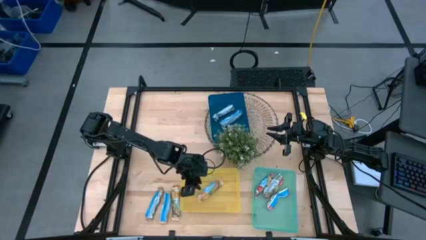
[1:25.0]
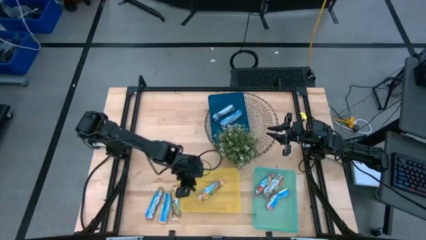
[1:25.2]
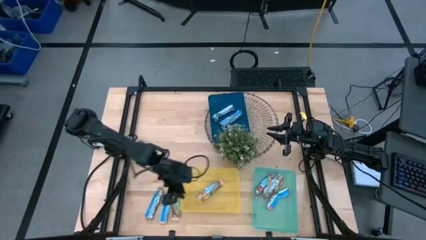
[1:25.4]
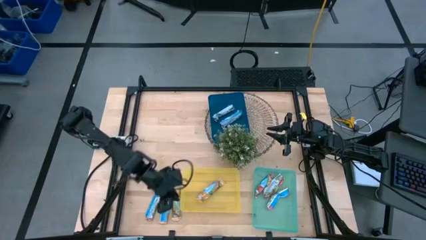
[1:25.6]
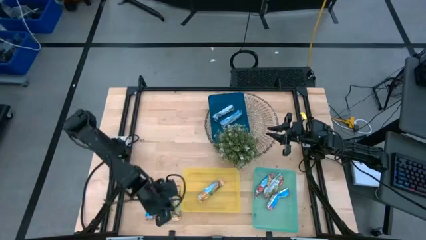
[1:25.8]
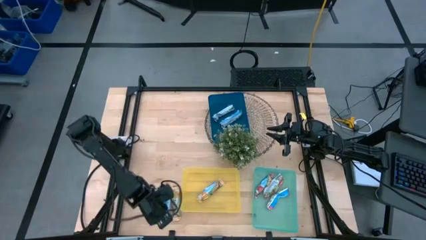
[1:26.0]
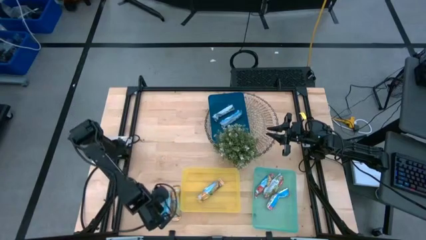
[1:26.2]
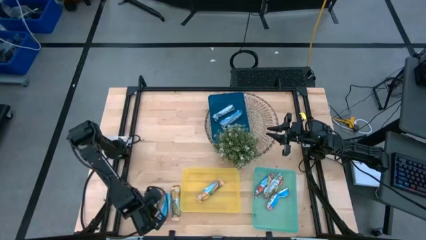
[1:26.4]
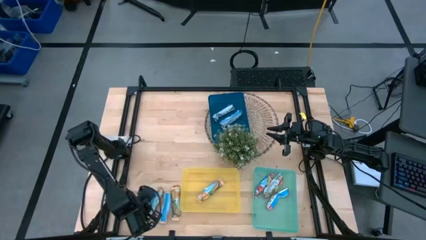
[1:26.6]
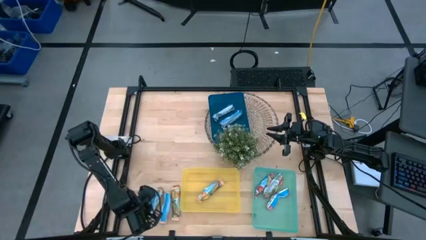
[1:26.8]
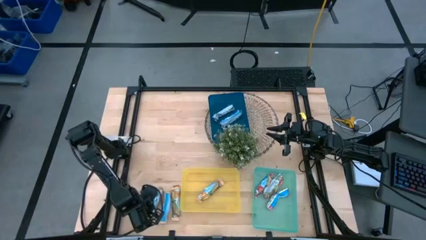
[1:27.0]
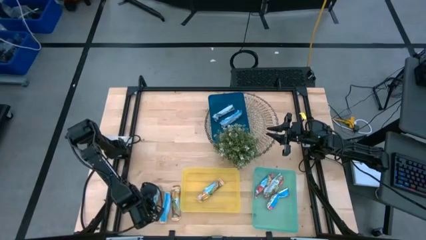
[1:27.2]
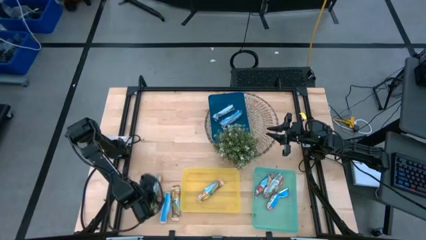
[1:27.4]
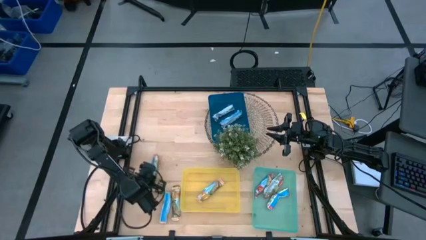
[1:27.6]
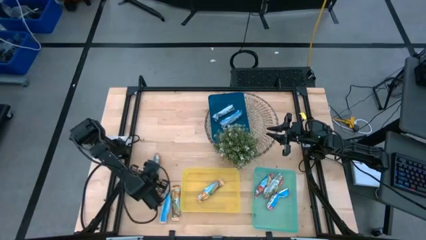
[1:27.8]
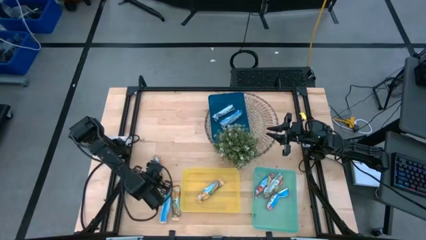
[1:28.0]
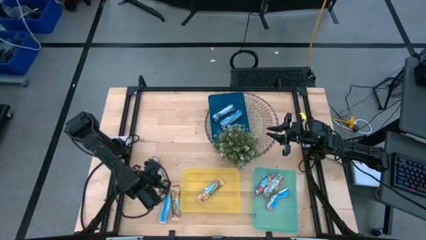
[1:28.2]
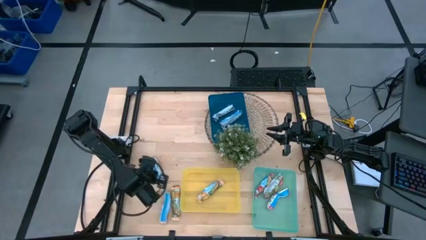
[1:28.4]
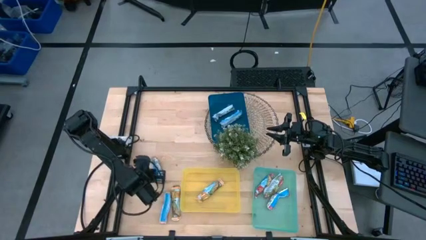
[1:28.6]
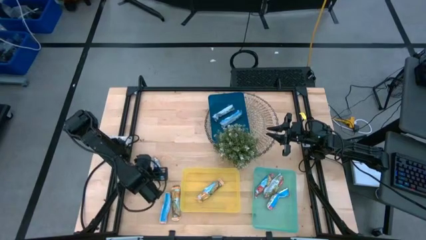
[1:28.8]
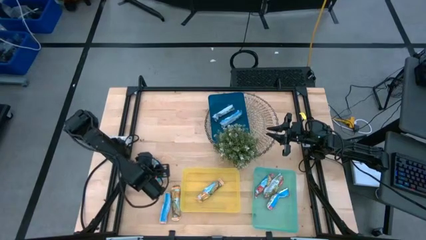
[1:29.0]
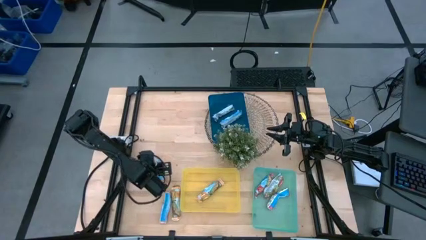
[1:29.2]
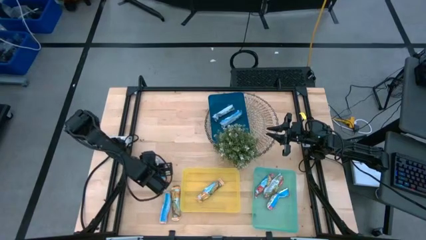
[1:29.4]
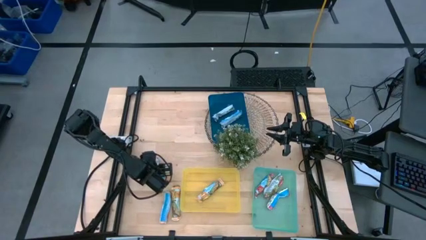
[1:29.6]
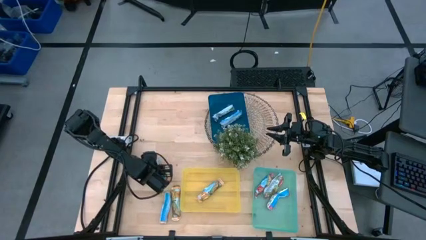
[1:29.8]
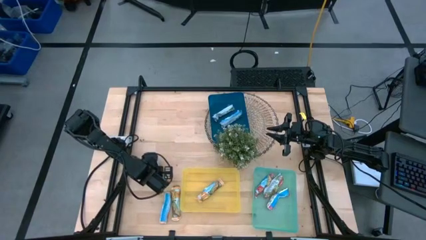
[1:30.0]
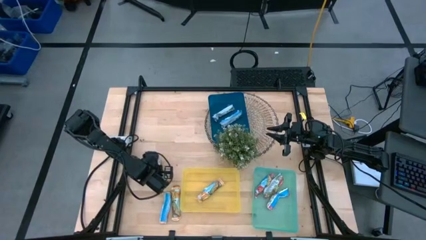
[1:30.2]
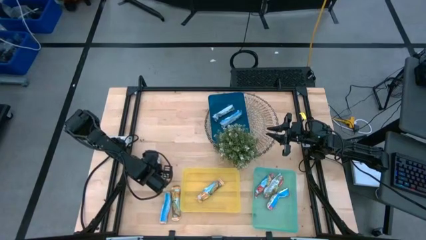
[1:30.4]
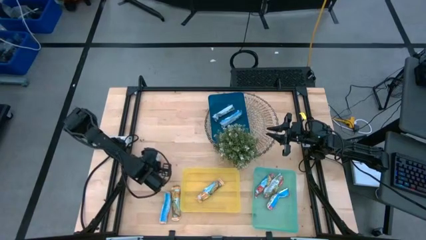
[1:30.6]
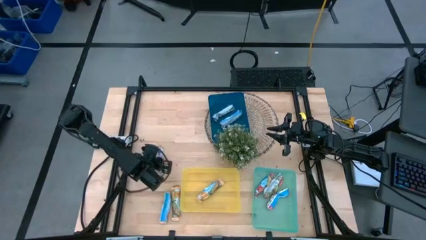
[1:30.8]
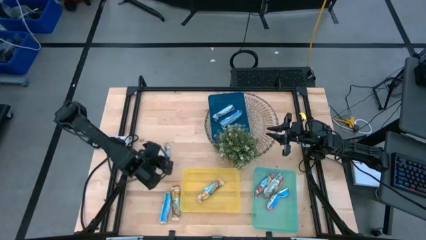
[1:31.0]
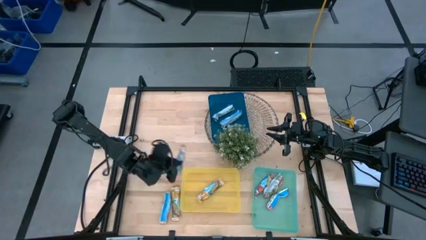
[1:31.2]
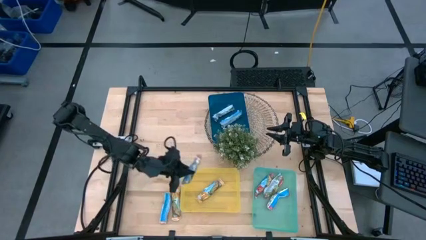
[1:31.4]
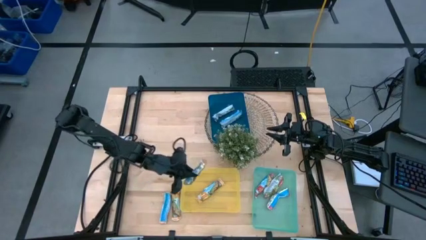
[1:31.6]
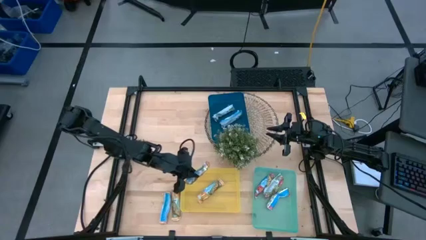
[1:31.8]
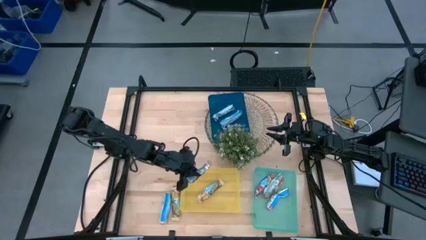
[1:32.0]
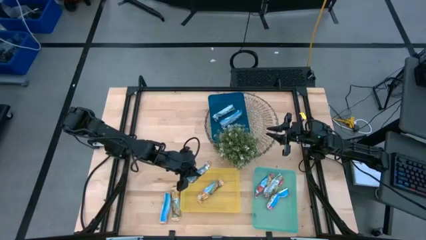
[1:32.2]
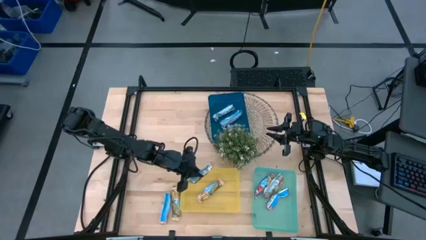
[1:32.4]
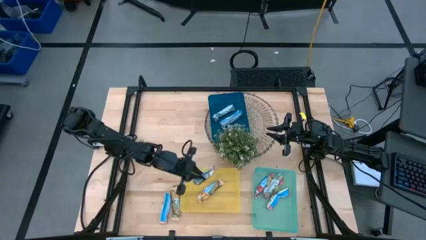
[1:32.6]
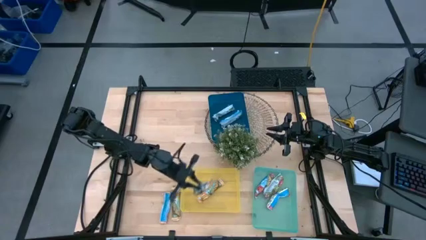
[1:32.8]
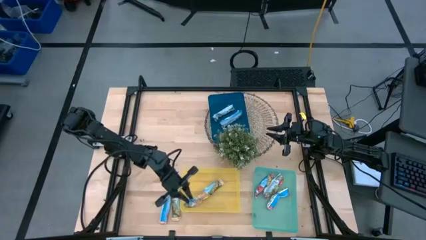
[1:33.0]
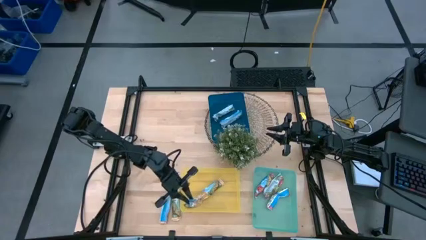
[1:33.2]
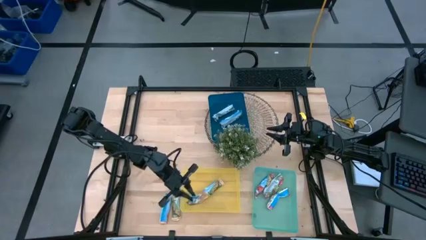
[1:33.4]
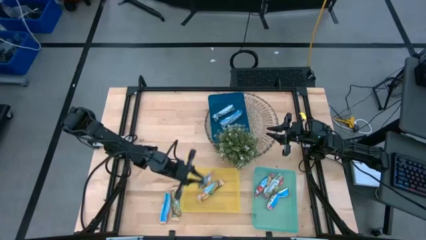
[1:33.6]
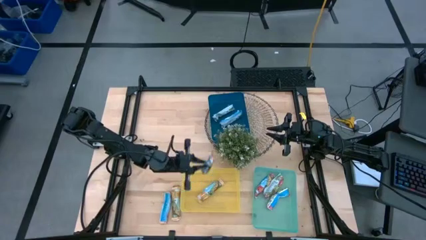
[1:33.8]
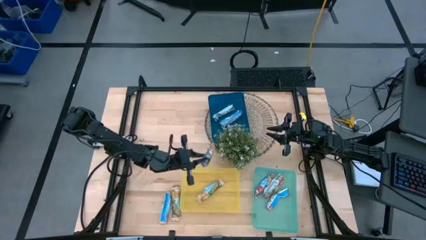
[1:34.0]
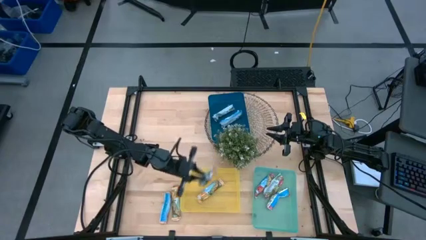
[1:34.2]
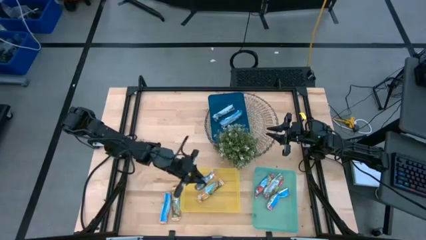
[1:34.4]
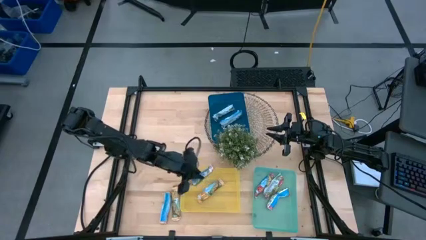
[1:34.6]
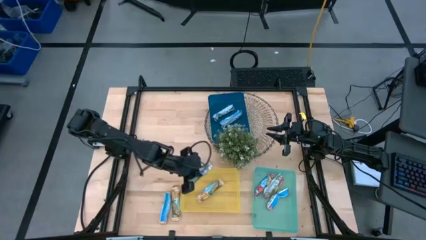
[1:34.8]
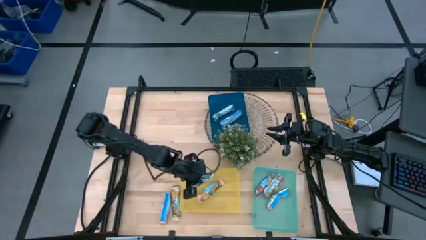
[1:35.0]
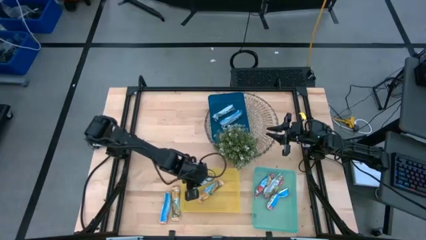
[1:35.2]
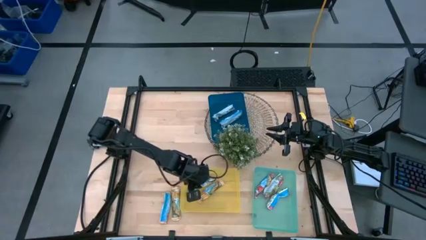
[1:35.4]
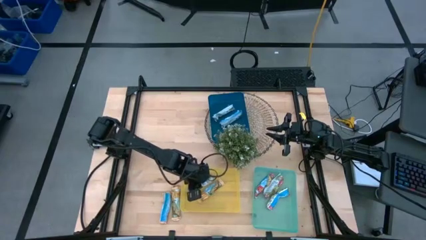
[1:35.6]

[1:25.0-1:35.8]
Task: Pick and place Granola Bars by type
Put the yellow granola bar into the yellow bin
